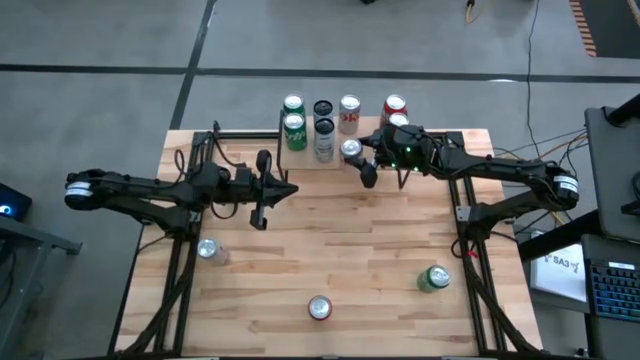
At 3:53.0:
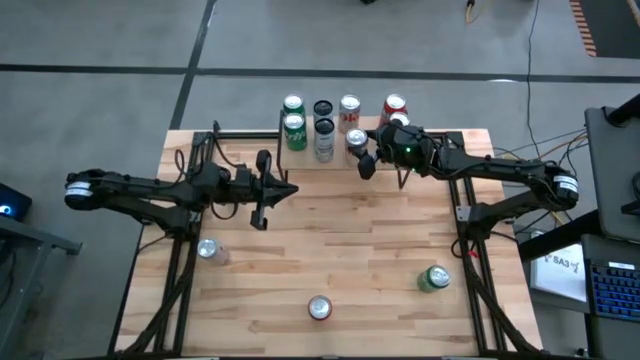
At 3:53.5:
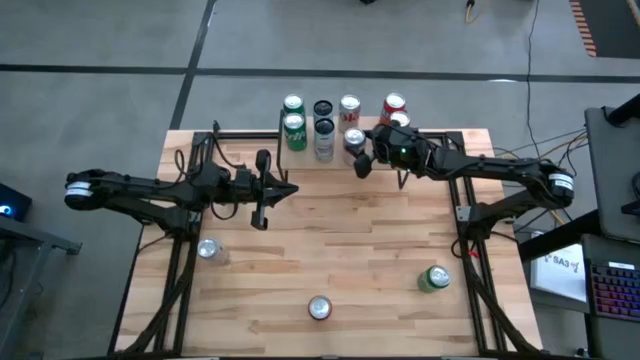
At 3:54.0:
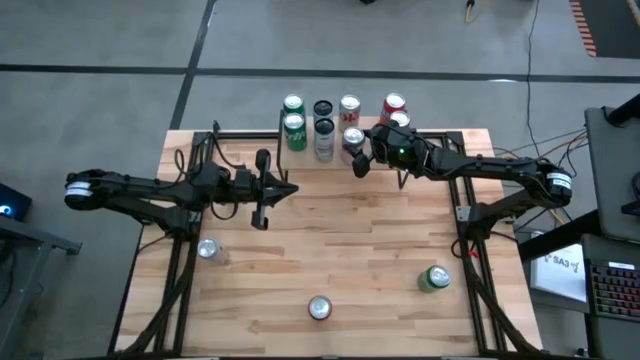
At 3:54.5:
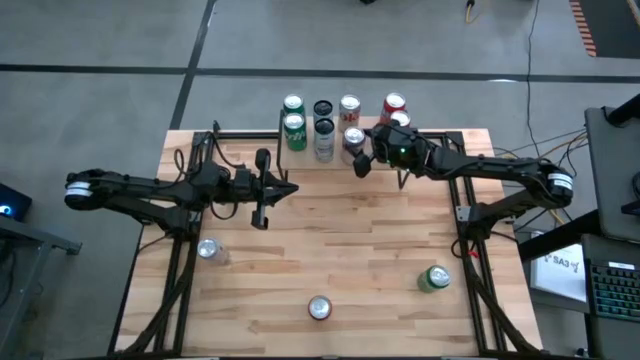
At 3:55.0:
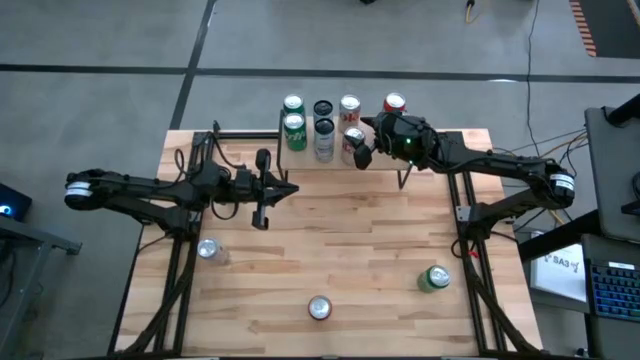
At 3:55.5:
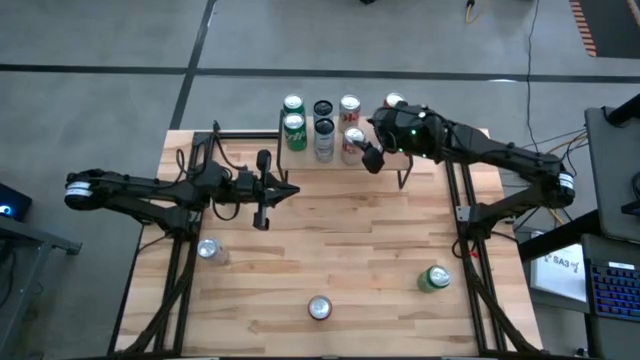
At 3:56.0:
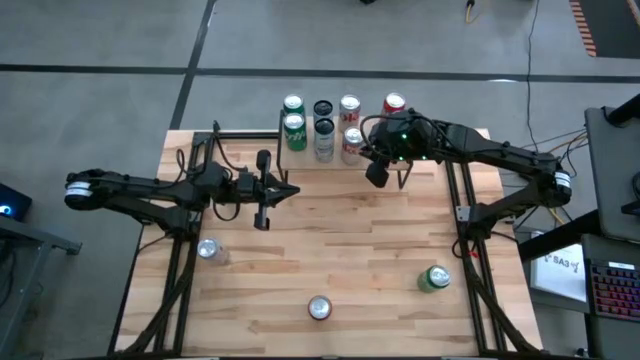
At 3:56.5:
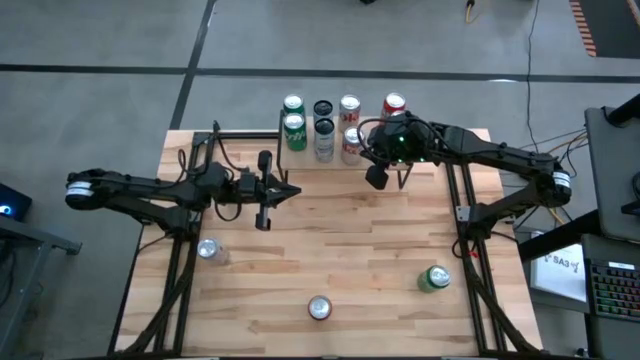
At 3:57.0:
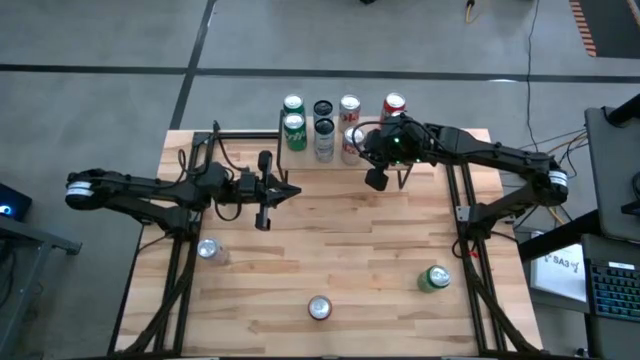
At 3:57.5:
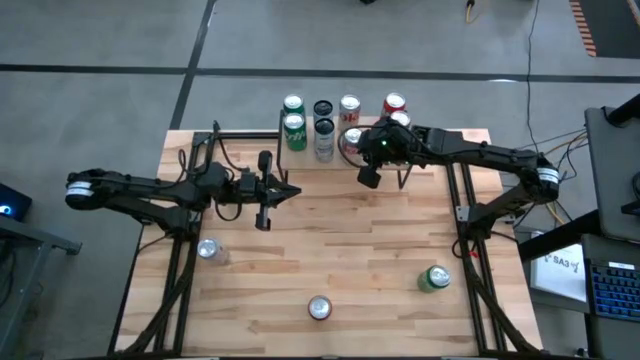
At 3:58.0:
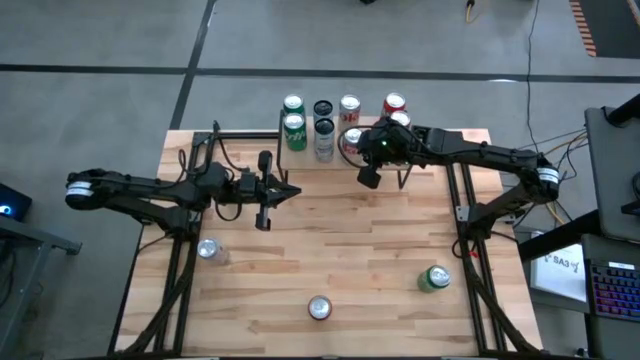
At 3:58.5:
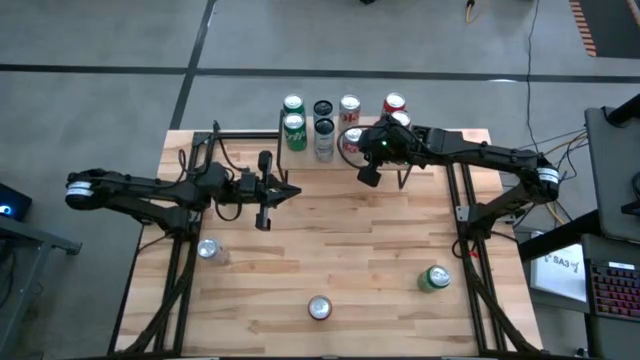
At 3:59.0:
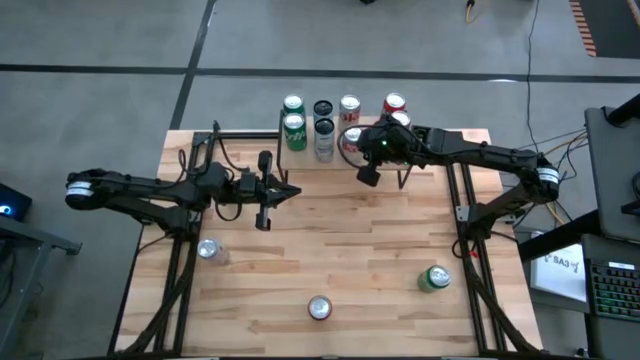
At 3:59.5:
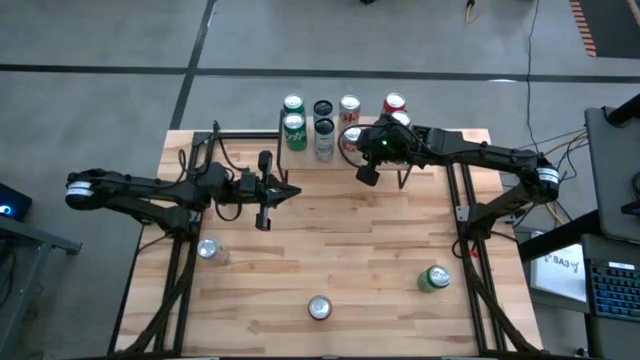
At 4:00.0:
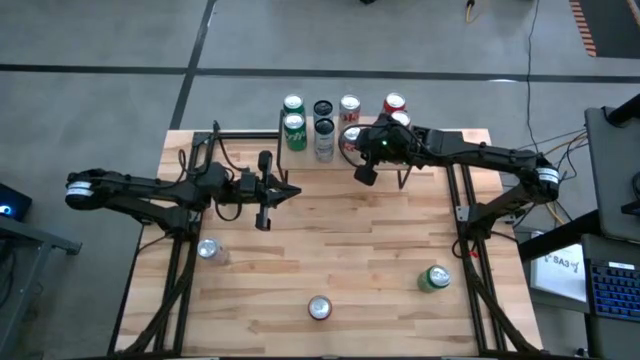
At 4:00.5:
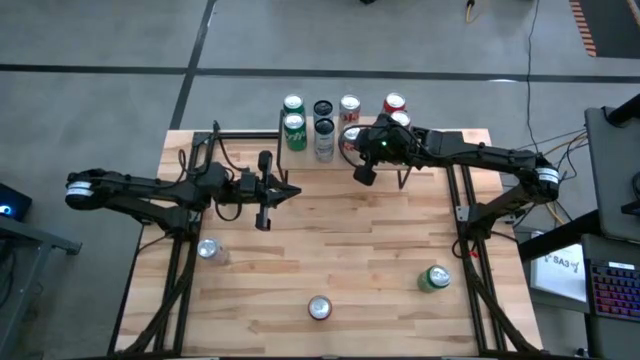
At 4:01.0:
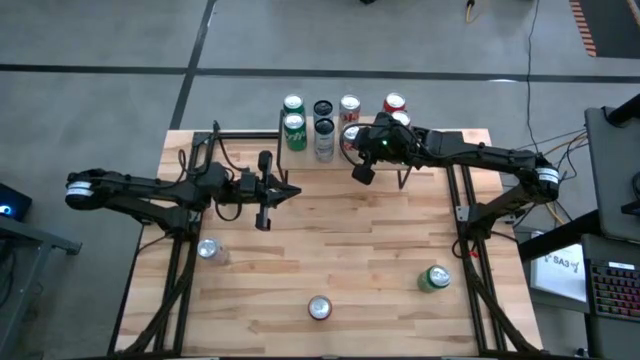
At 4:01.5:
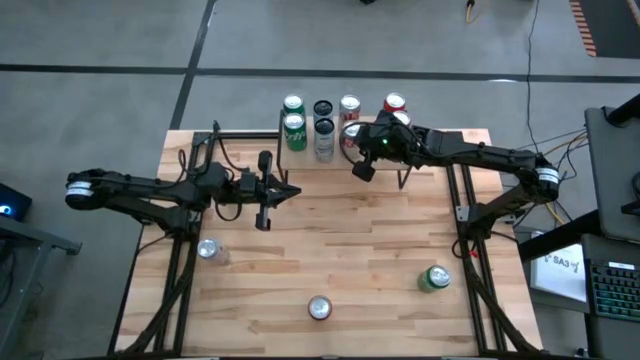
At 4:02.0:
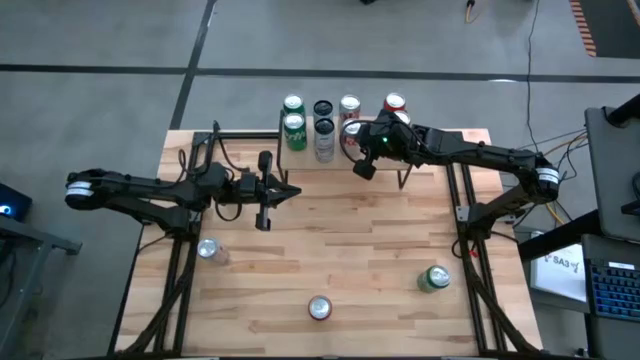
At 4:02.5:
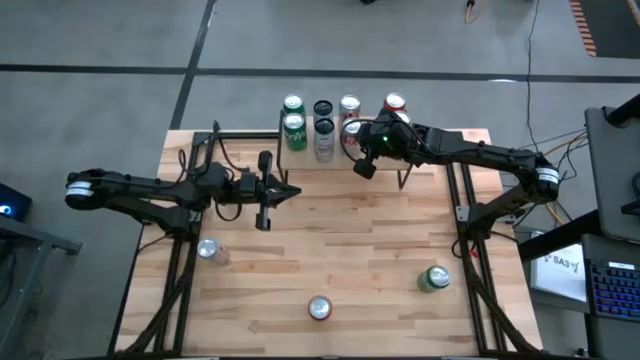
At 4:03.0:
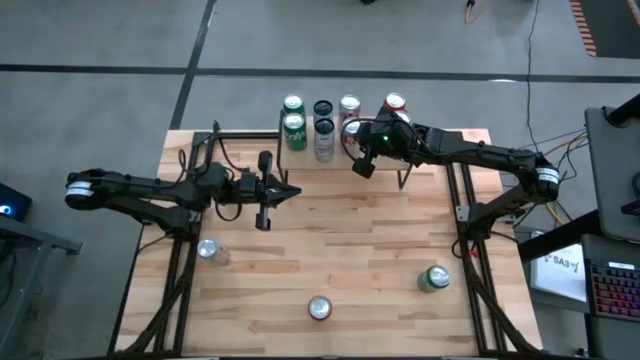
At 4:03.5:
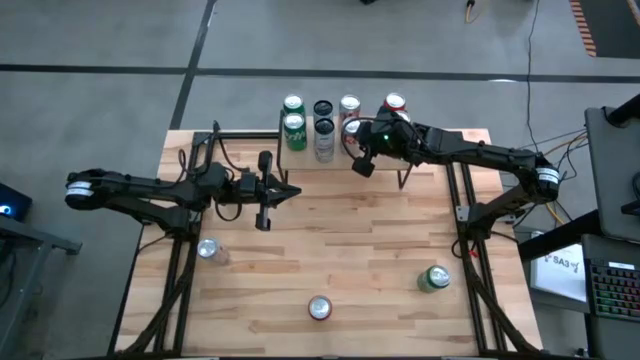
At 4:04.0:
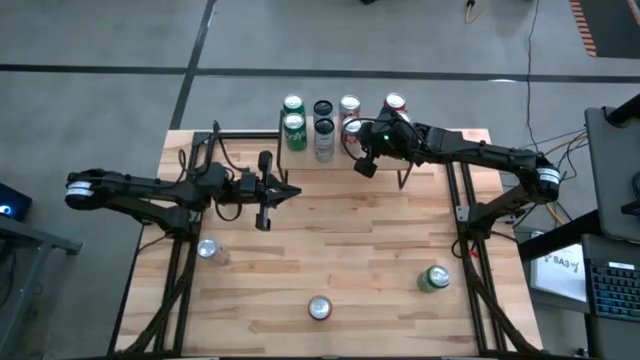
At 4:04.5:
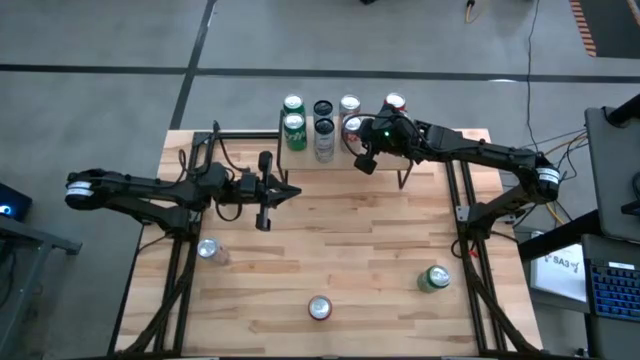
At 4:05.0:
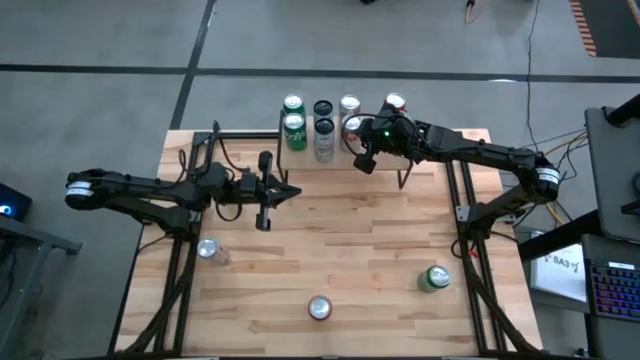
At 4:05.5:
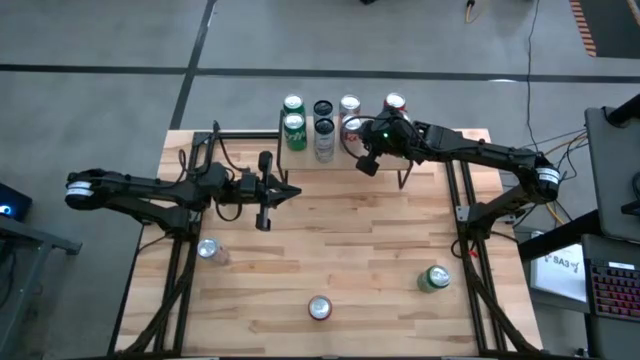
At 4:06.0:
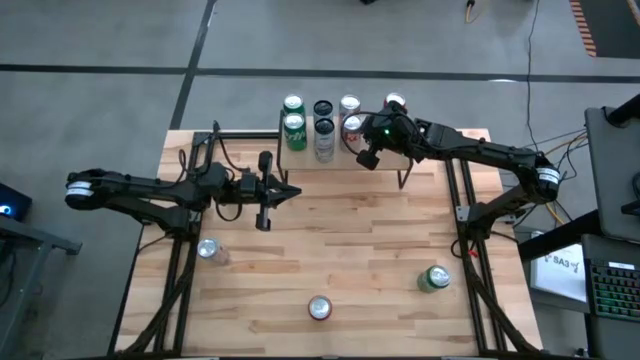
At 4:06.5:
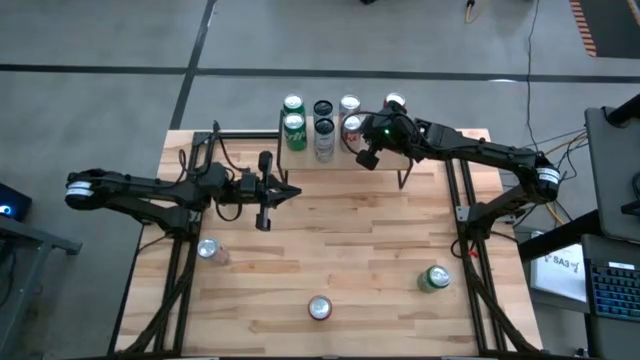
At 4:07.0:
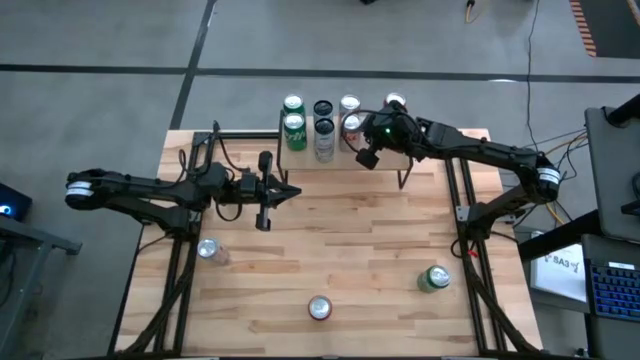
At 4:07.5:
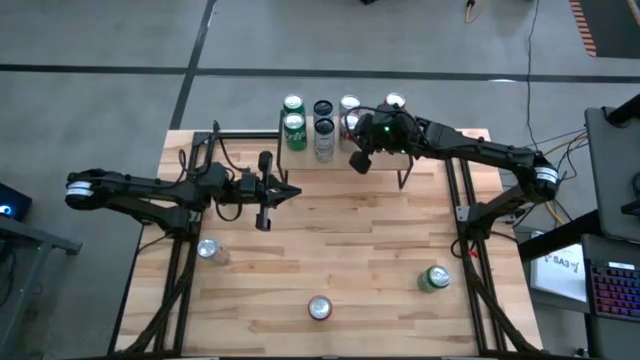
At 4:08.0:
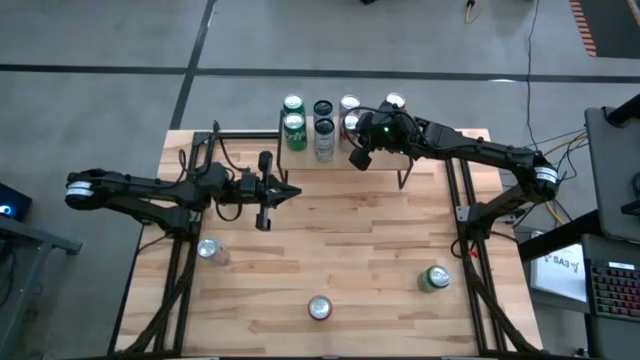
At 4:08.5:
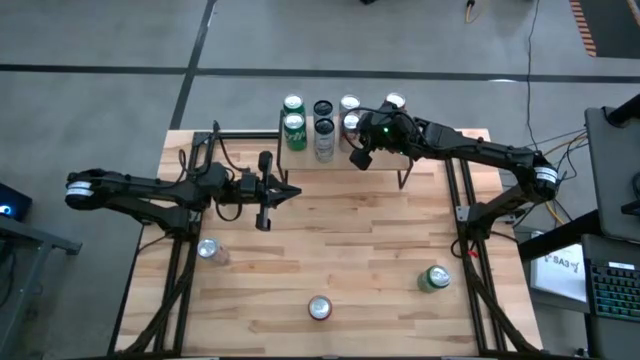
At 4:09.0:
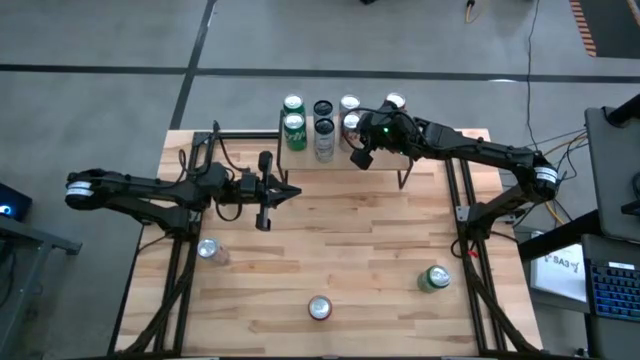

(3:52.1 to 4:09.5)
Task: Place canned beverage on shelf
Put the bottom white red soda can on the shelf aligned with the other white red soda can
